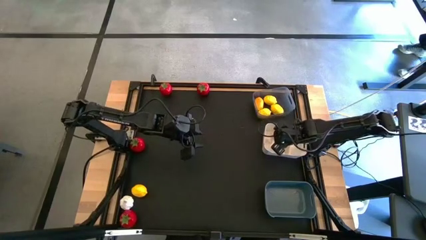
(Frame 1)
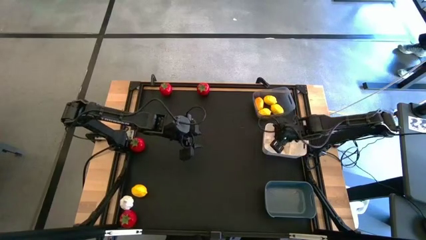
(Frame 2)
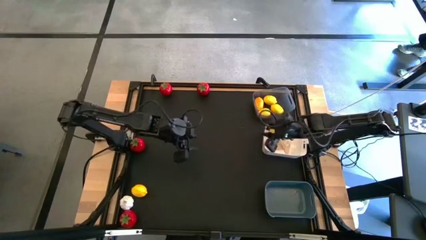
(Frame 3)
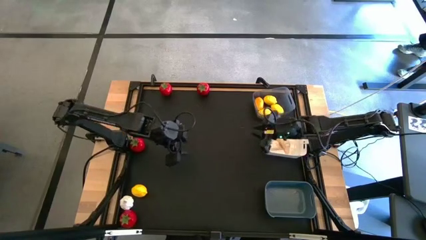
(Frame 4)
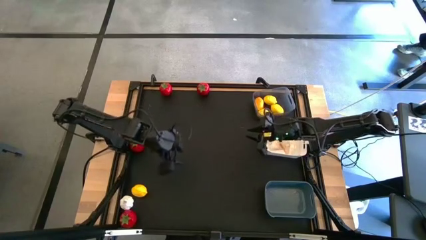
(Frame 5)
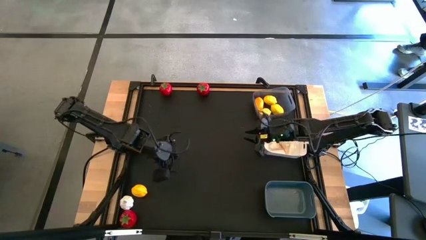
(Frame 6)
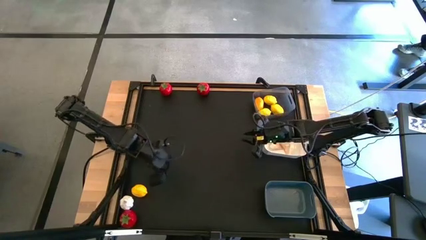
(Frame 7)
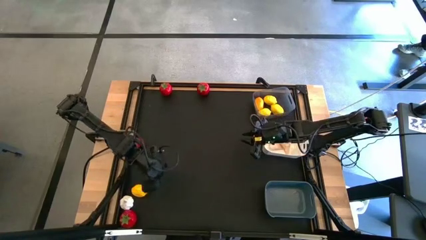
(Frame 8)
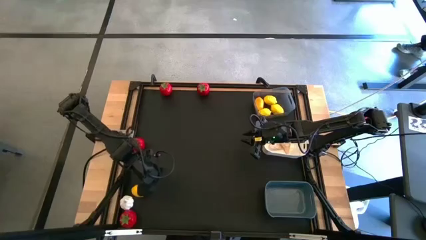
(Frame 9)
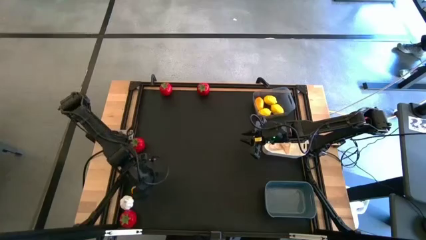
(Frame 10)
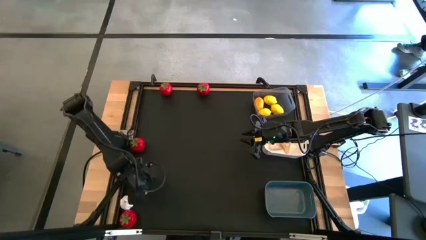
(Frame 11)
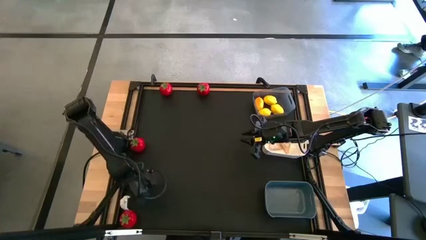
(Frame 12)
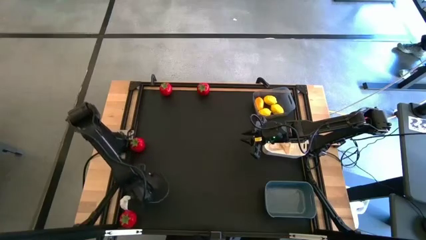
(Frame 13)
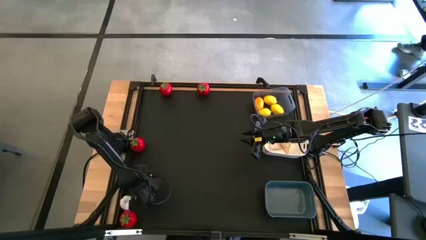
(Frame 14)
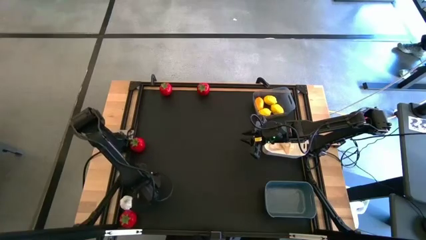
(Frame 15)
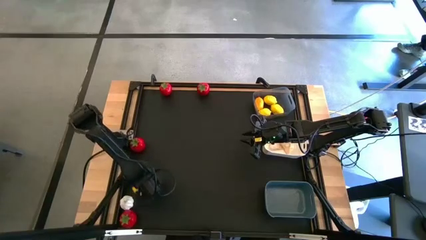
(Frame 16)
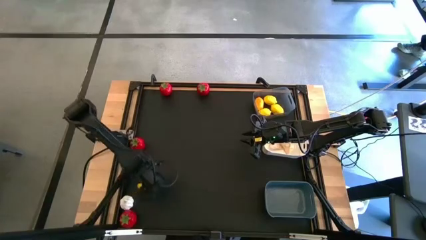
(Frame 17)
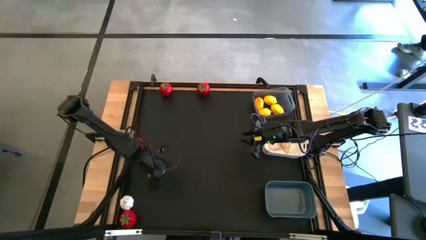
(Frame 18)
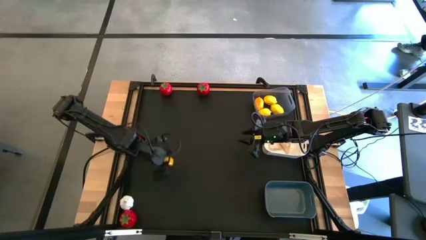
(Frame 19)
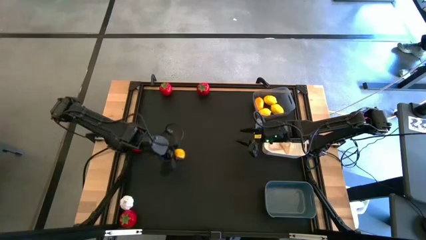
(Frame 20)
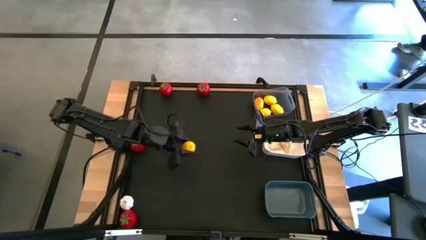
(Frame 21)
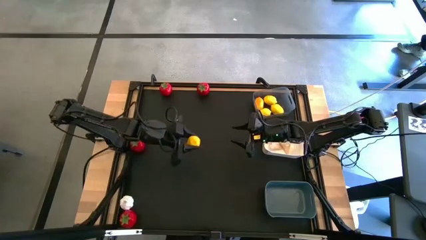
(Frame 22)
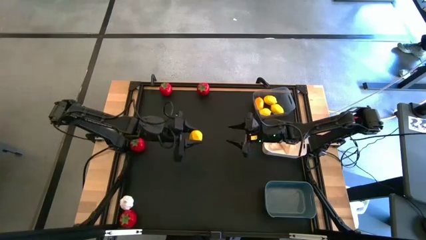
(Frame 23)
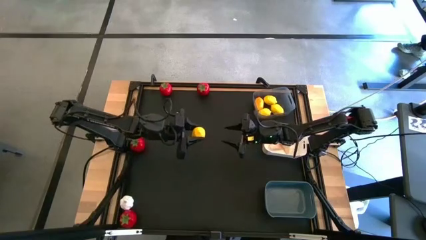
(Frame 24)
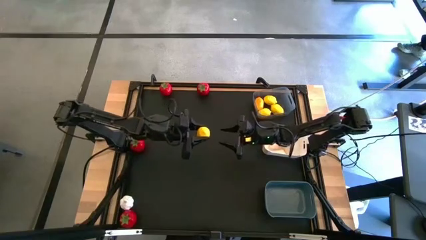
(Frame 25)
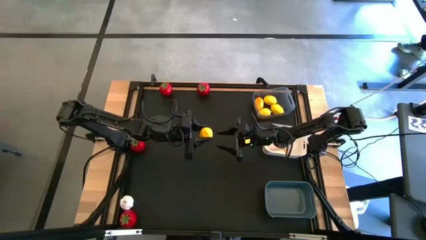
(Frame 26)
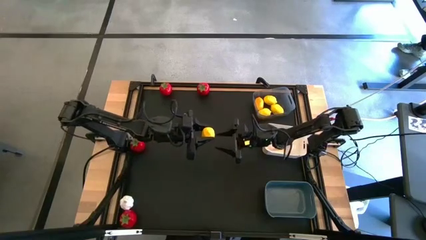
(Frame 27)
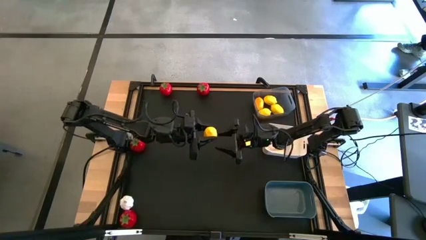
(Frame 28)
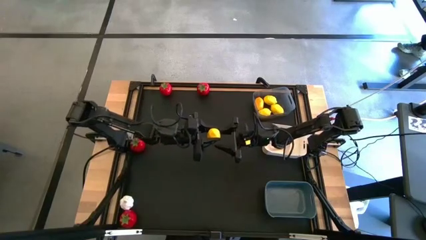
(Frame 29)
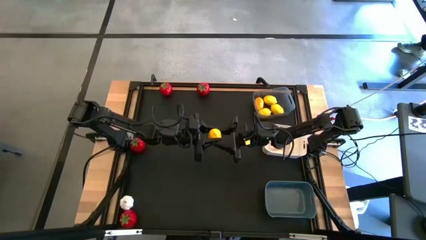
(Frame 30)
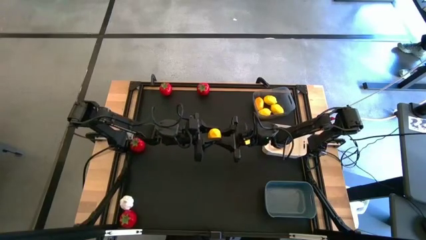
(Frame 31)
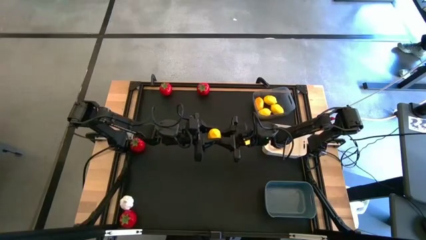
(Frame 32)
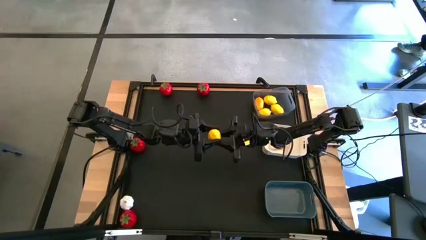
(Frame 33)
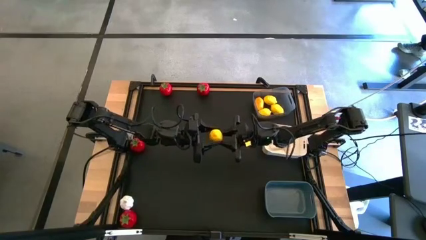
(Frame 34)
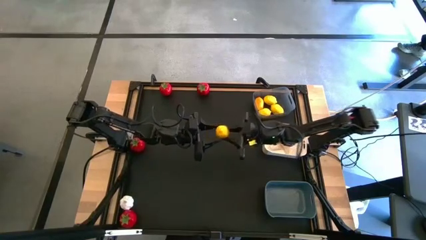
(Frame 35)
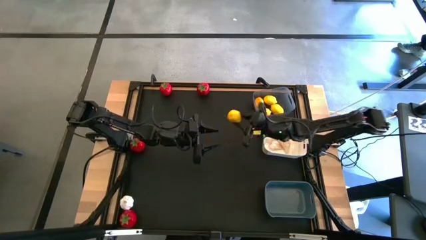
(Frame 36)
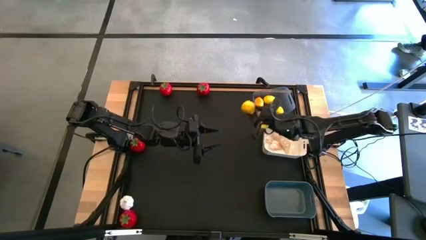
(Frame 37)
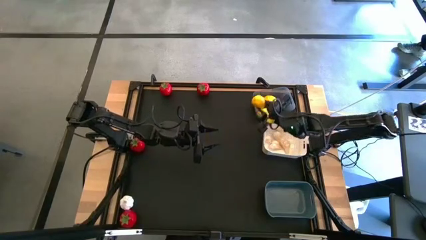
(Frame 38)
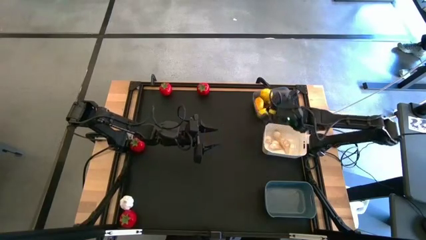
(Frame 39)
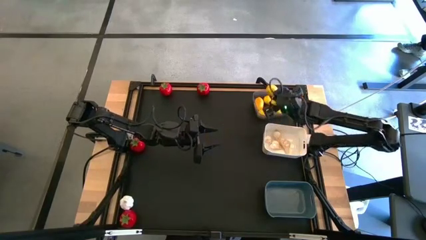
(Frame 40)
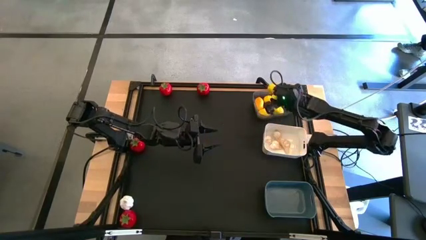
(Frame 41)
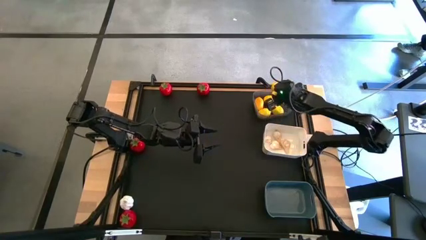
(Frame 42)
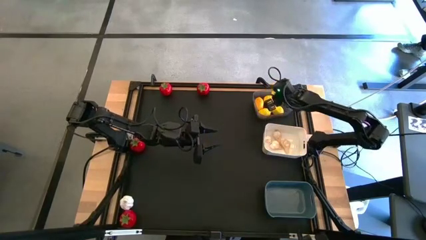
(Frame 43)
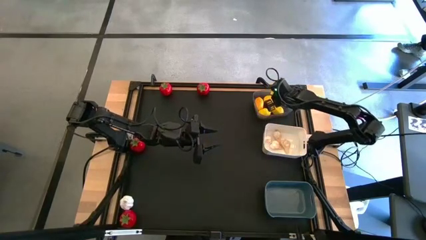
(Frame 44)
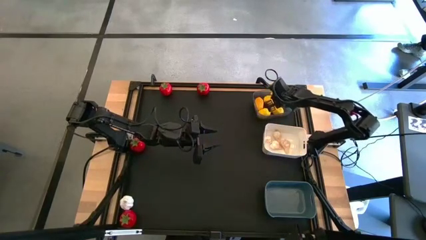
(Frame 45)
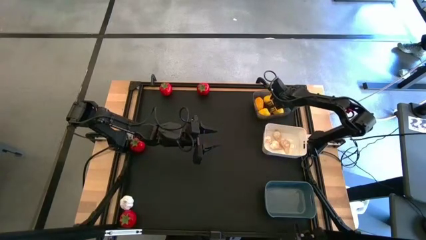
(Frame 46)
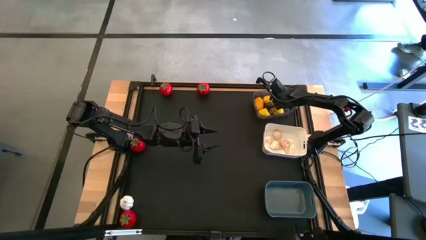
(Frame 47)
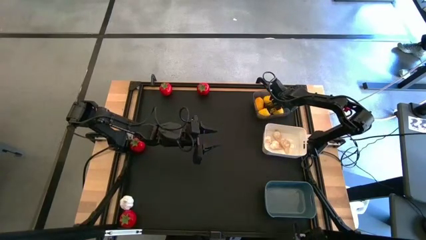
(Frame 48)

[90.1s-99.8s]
Task: Sort produce into baskets
Put the lemon into the black bin

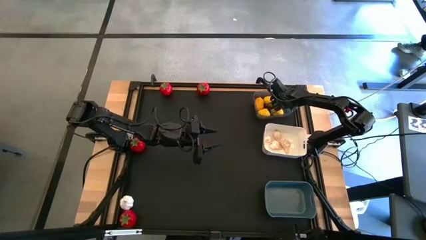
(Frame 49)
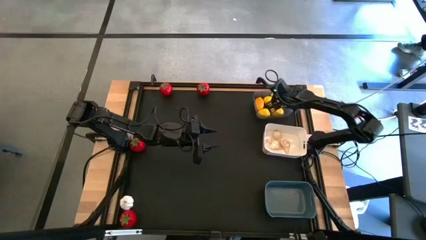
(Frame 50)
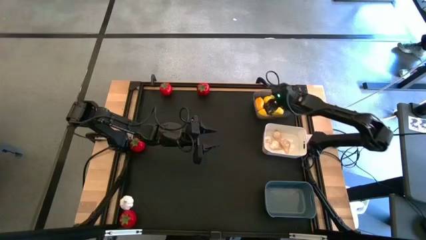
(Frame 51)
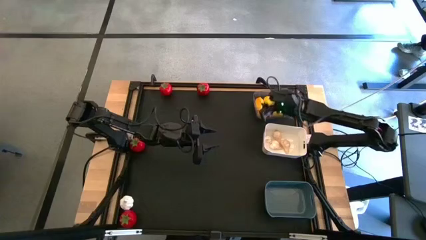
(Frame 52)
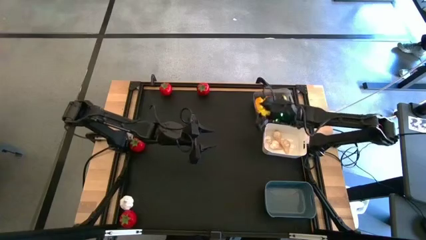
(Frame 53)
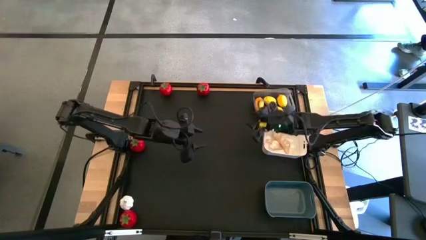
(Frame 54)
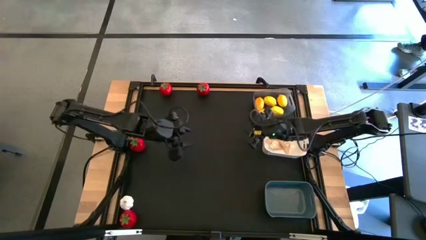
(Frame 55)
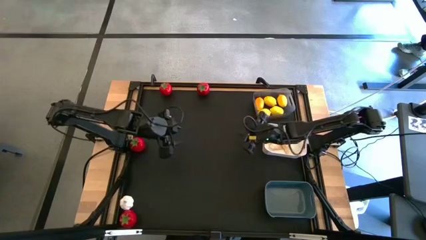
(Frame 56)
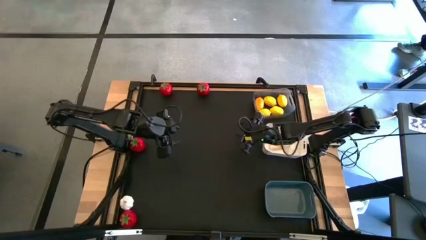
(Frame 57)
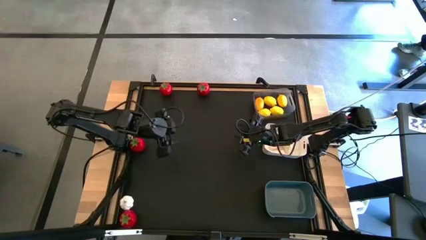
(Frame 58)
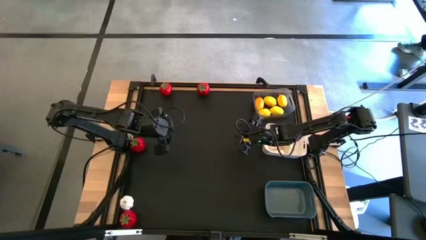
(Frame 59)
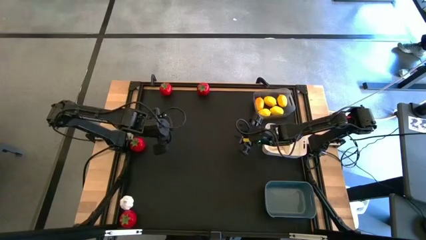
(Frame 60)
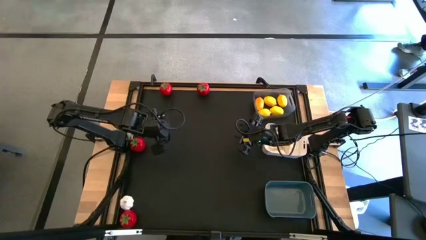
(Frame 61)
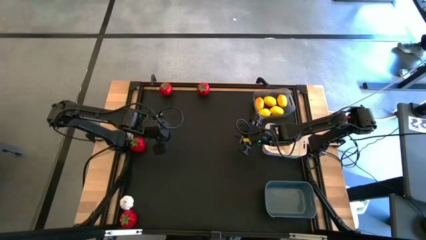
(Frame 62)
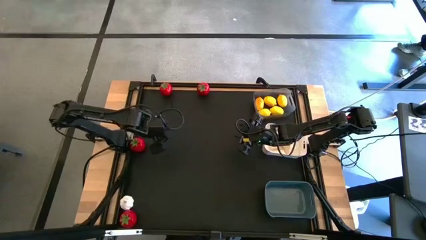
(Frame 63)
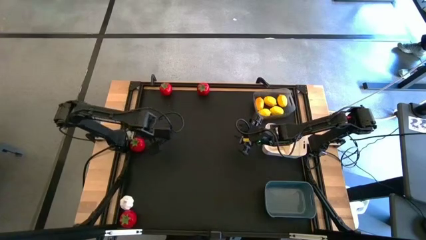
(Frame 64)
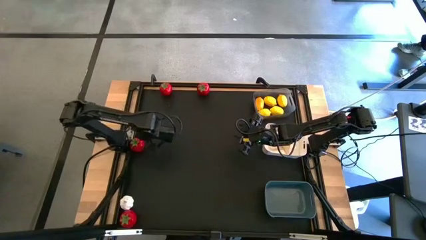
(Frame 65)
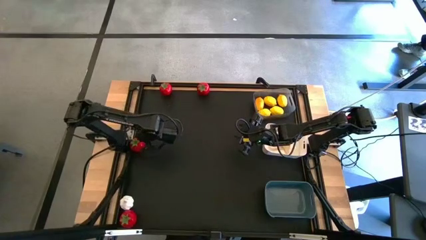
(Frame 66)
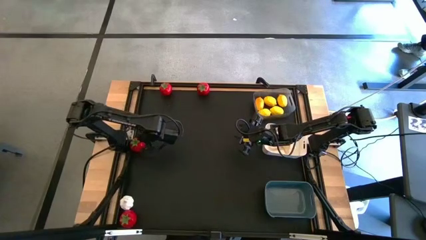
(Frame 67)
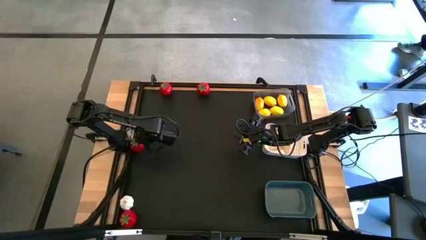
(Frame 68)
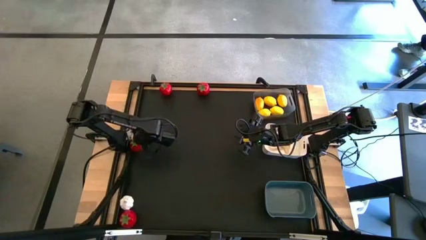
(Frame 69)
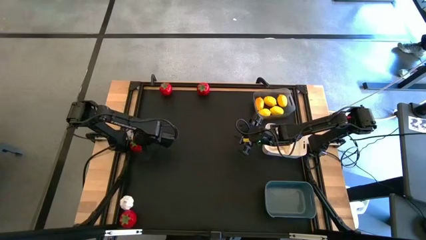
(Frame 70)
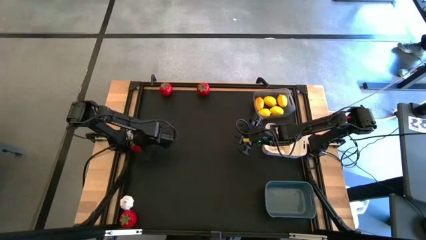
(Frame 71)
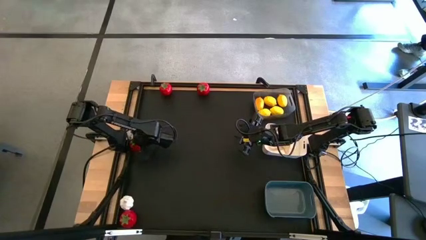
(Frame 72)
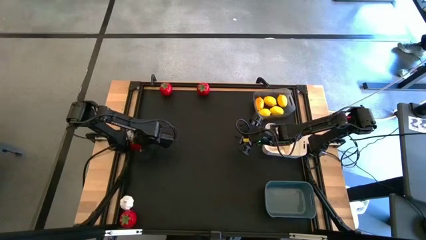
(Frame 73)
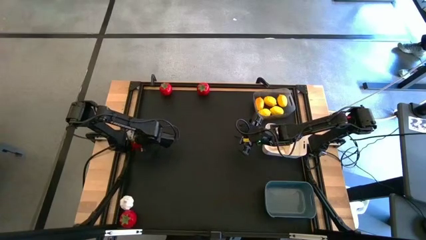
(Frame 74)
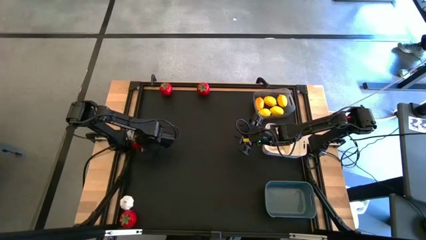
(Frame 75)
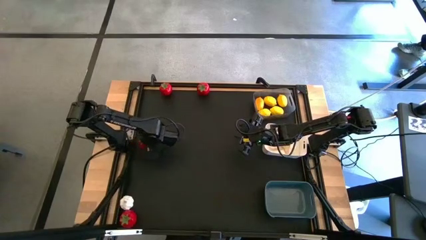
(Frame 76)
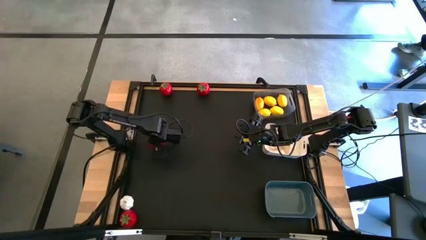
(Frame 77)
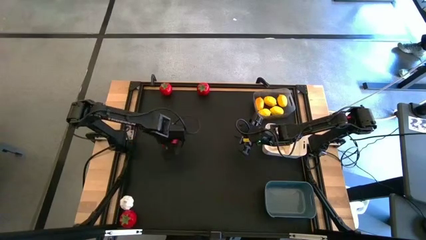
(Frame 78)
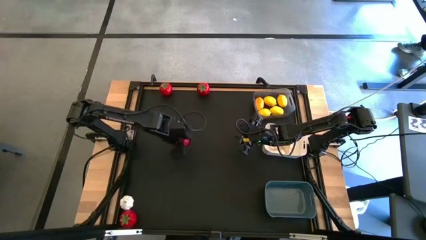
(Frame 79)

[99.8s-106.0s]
Put the tomato into the the blue bin
